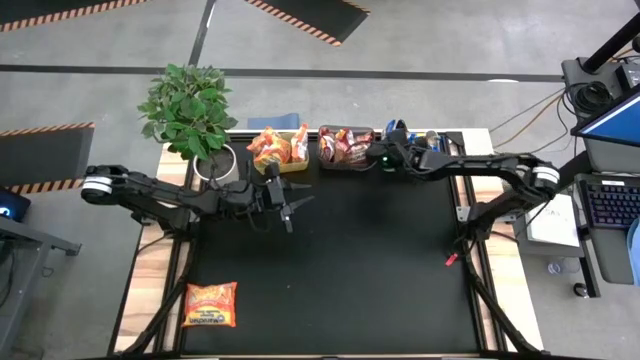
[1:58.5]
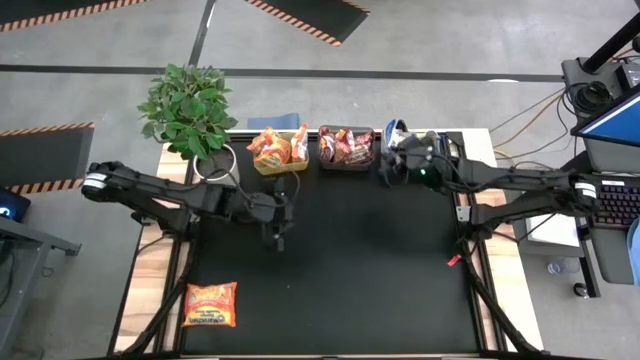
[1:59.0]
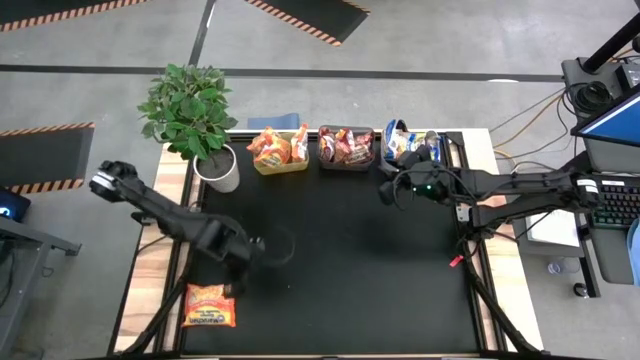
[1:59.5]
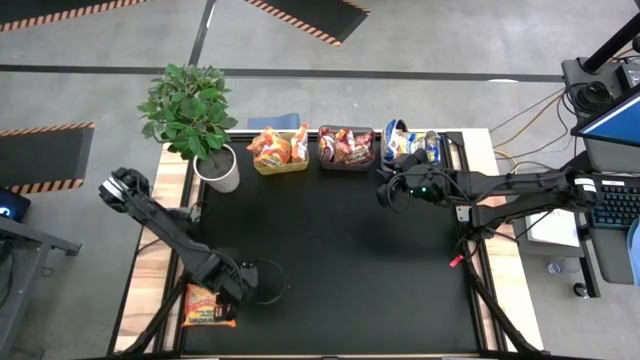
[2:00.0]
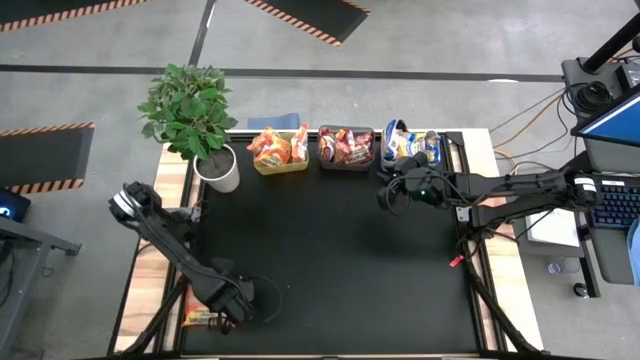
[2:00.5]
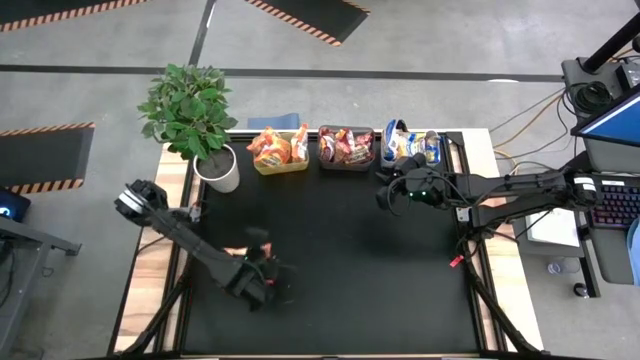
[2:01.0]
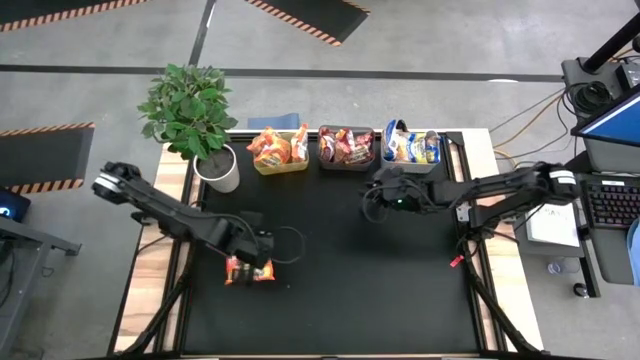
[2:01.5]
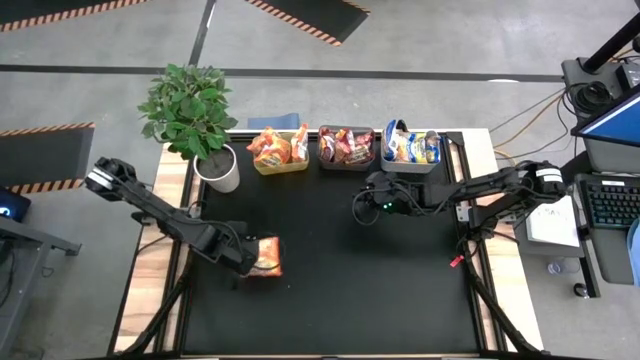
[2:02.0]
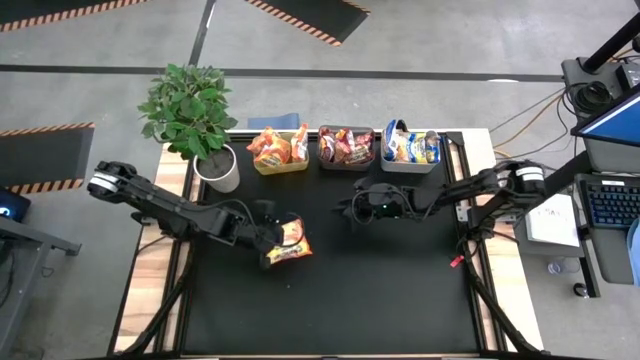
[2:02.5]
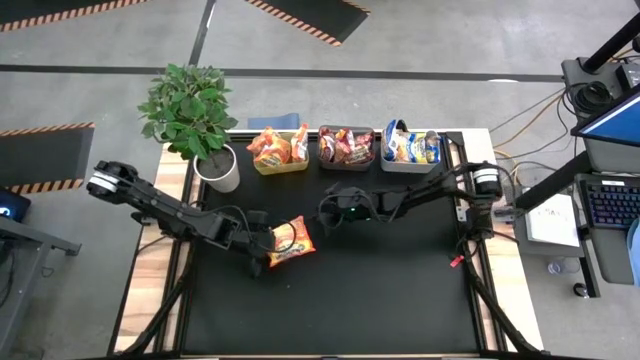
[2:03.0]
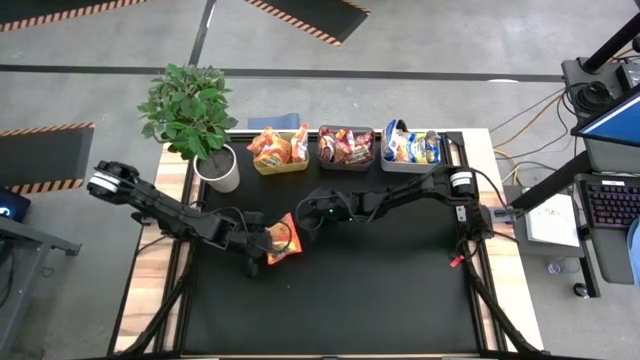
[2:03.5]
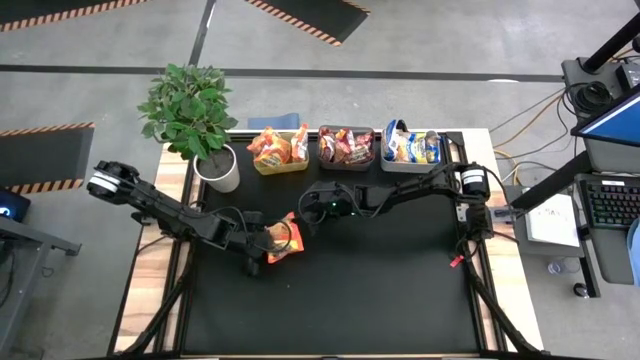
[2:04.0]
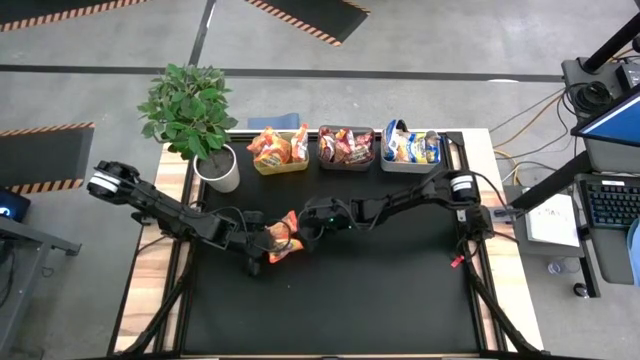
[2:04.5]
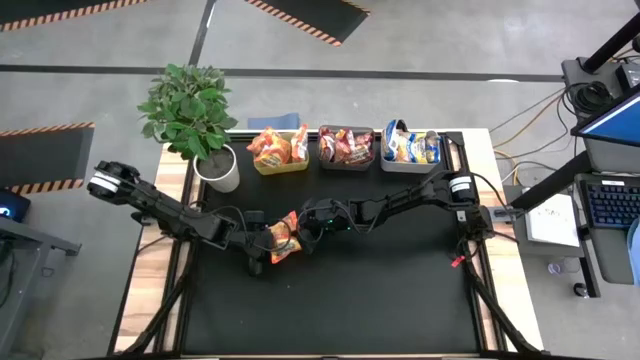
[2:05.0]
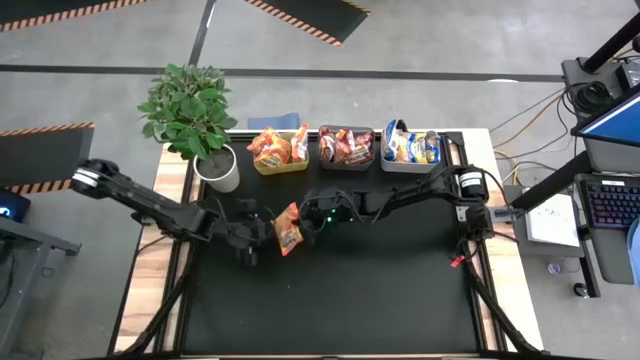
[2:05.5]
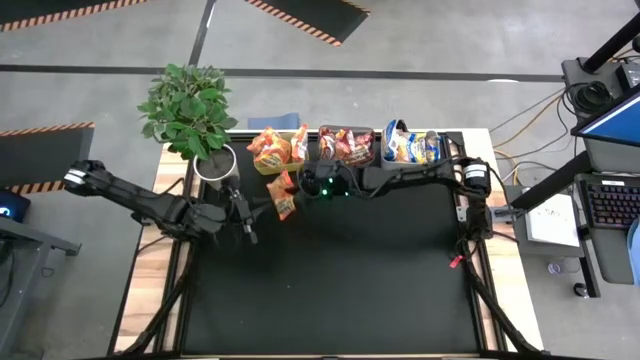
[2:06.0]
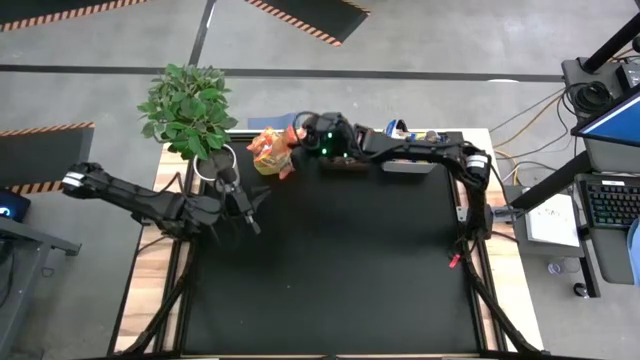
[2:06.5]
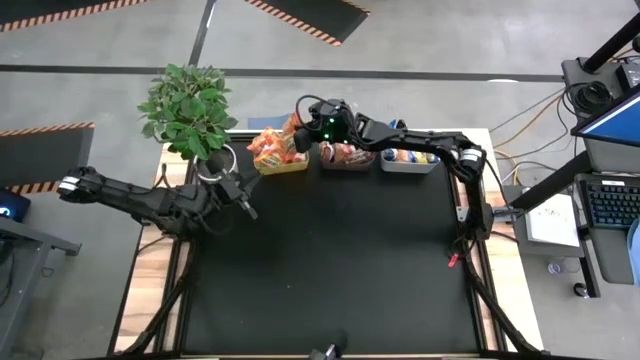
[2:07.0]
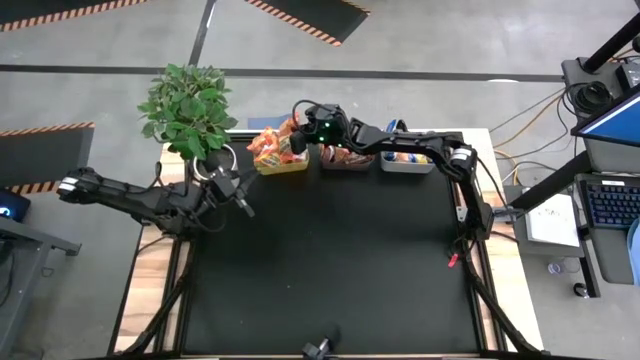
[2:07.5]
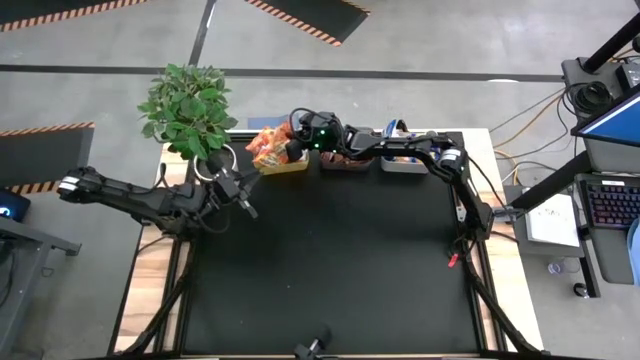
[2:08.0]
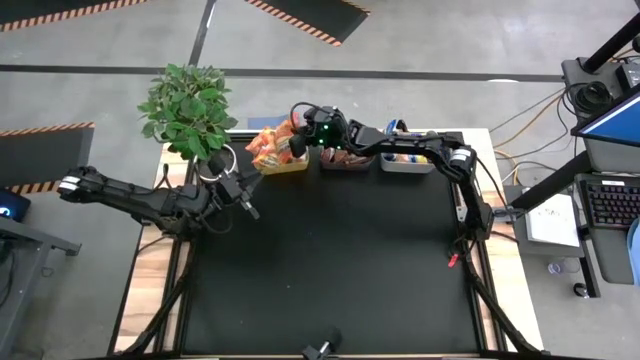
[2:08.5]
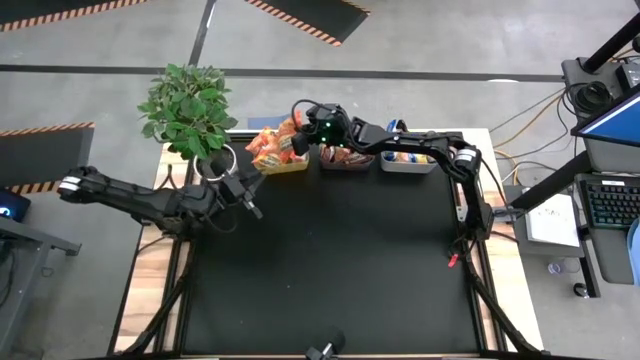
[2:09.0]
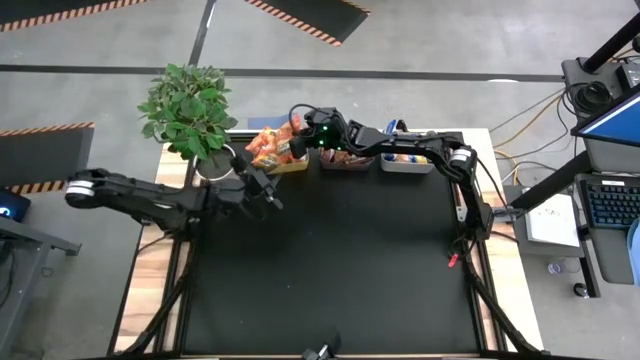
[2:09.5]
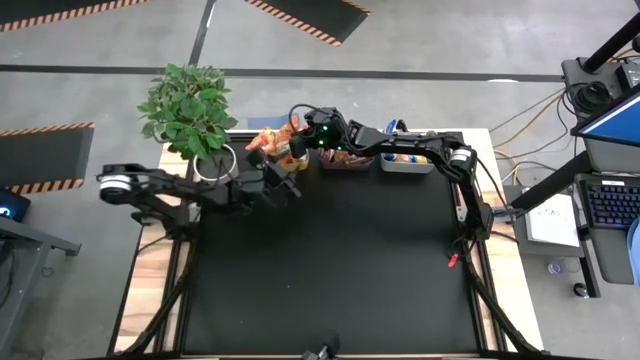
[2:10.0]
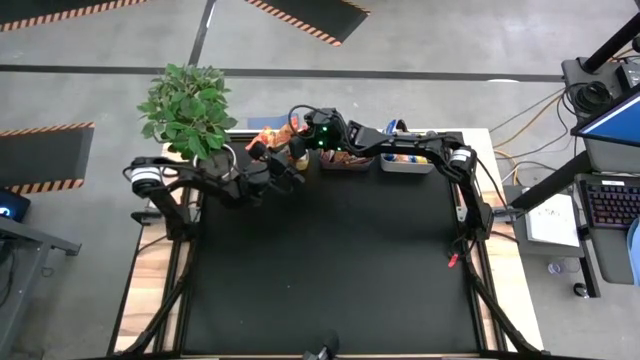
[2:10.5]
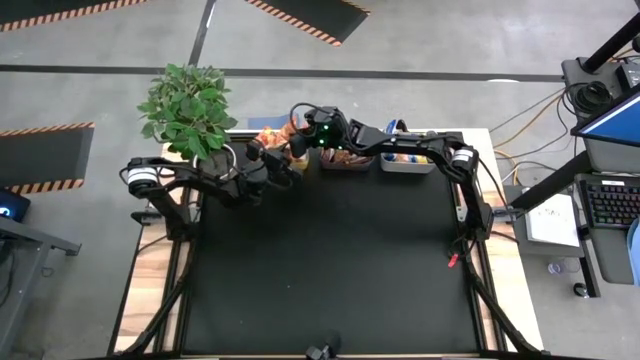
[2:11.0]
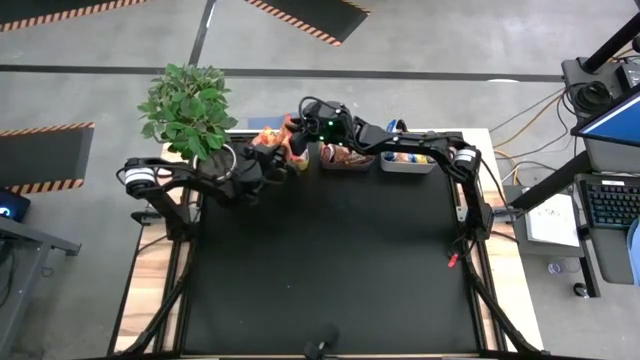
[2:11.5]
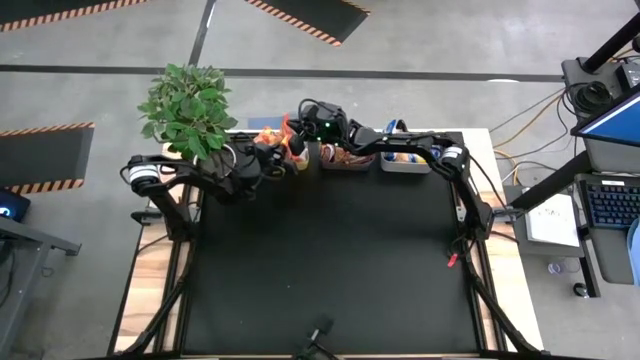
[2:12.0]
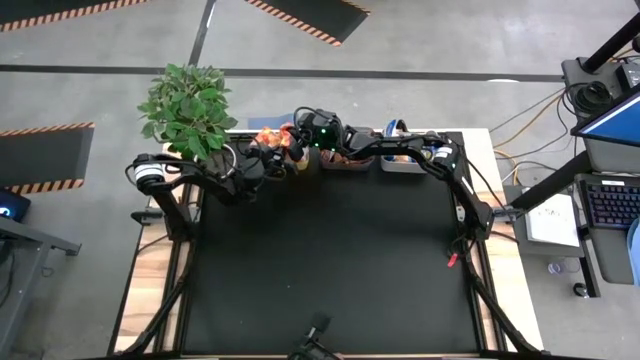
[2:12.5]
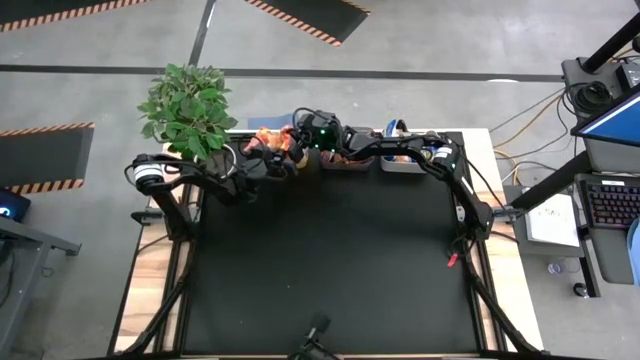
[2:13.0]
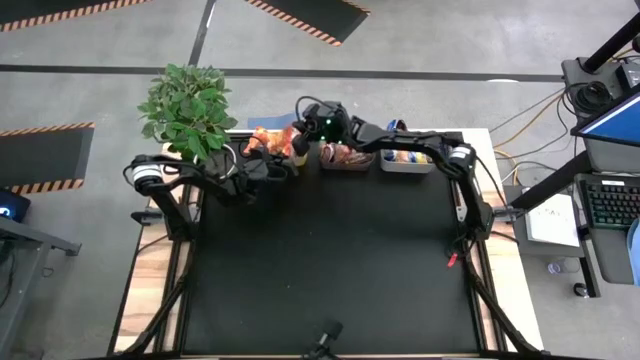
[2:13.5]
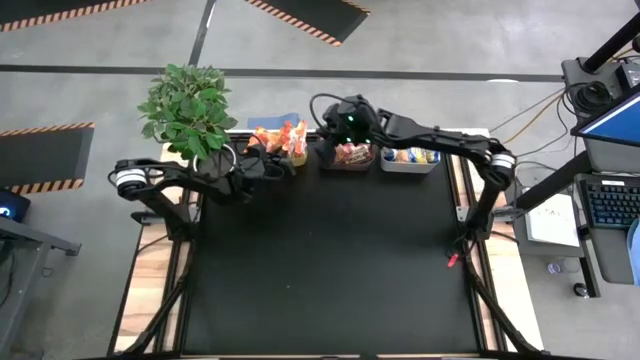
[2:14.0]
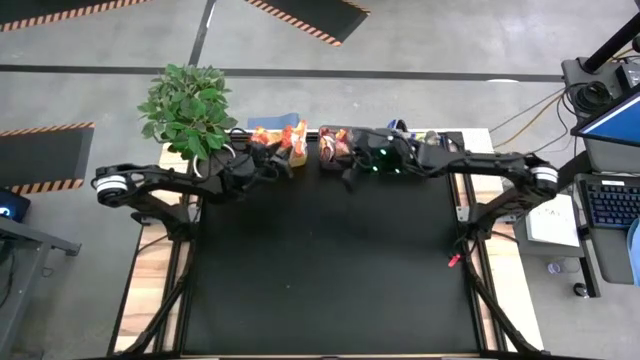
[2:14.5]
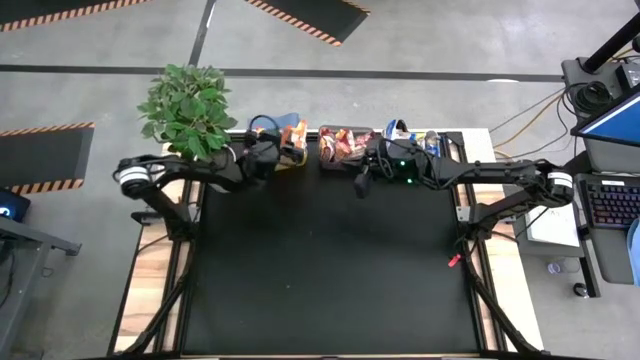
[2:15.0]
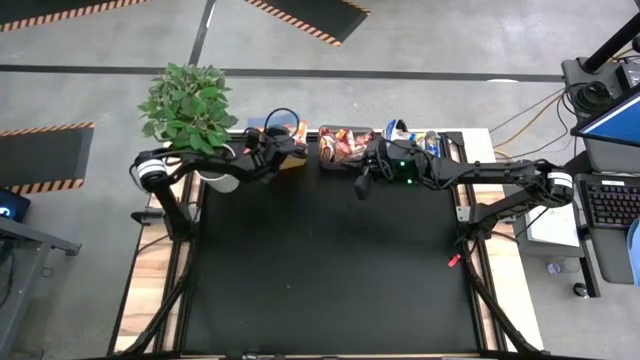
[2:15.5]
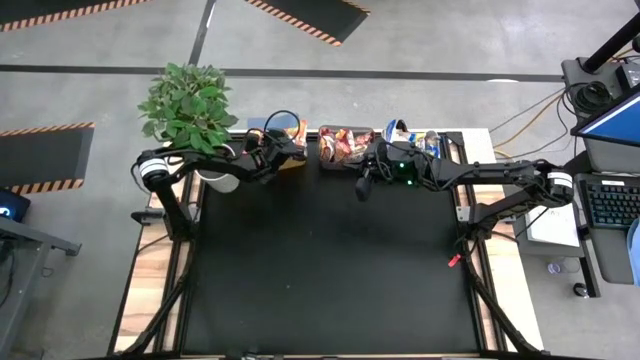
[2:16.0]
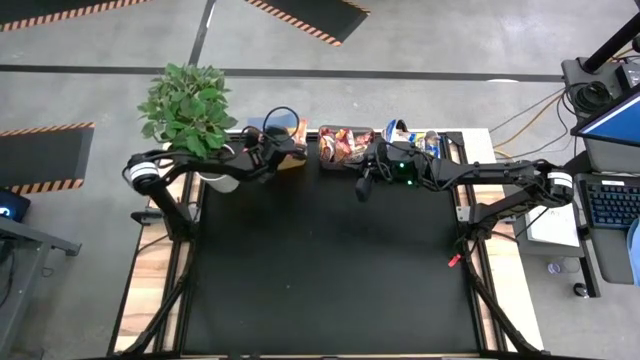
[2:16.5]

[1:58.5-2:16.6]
Task: Sort Maruchan noodles
Put the orange noodle pack into the yellow bin

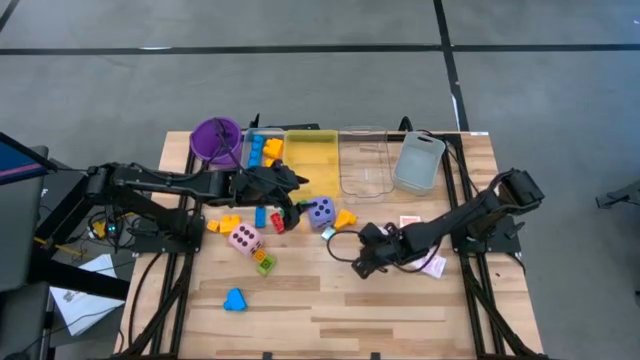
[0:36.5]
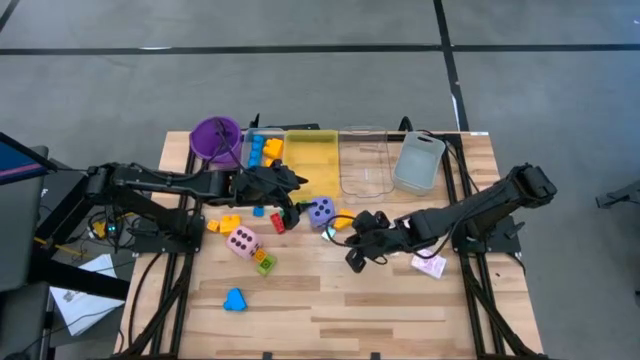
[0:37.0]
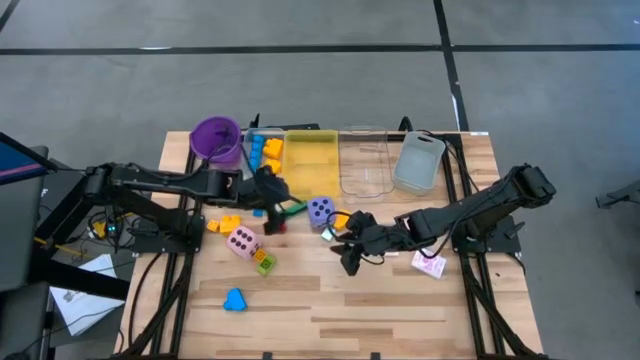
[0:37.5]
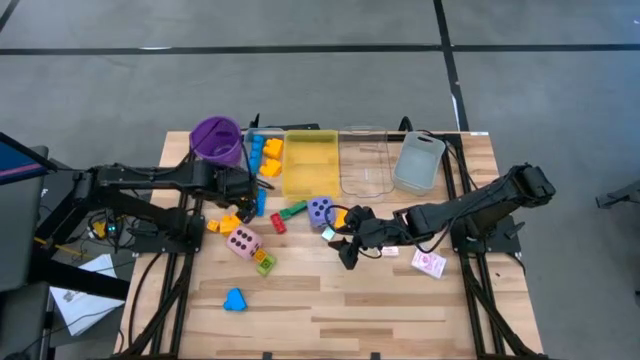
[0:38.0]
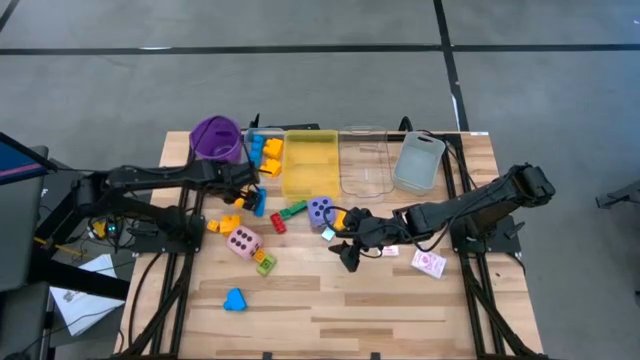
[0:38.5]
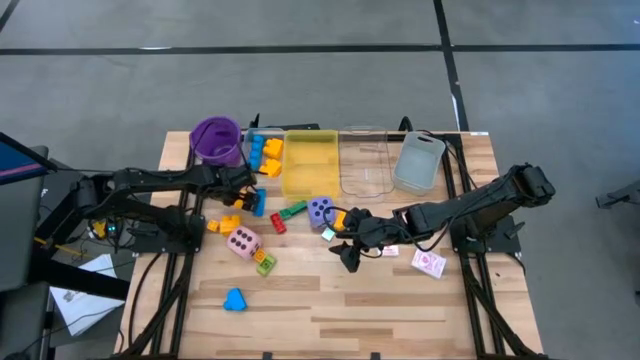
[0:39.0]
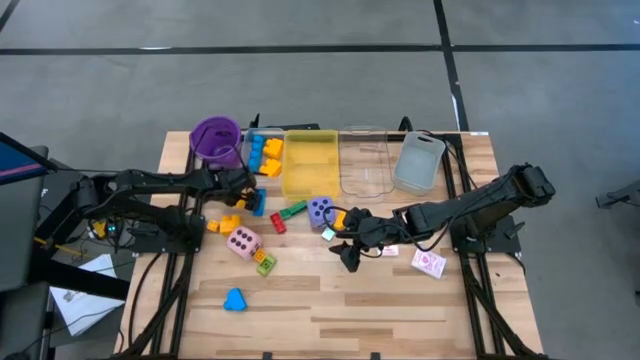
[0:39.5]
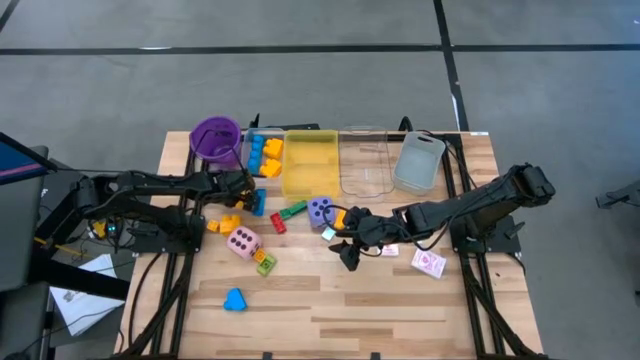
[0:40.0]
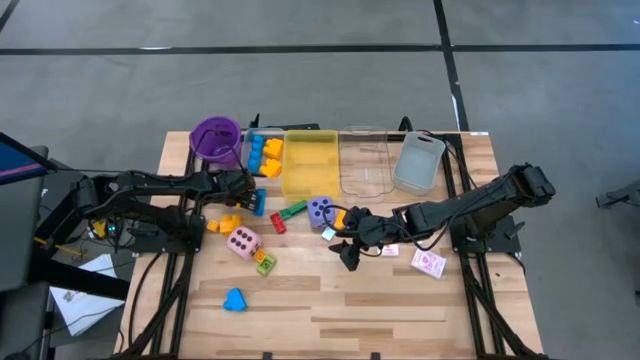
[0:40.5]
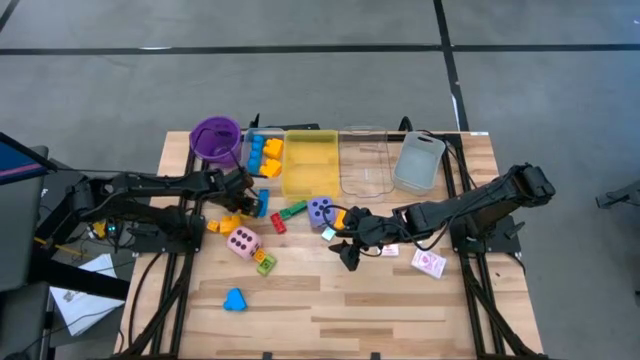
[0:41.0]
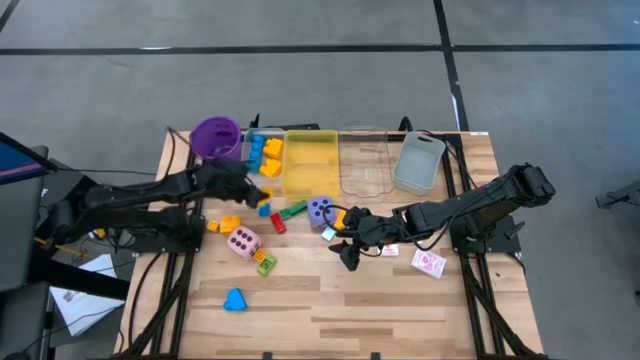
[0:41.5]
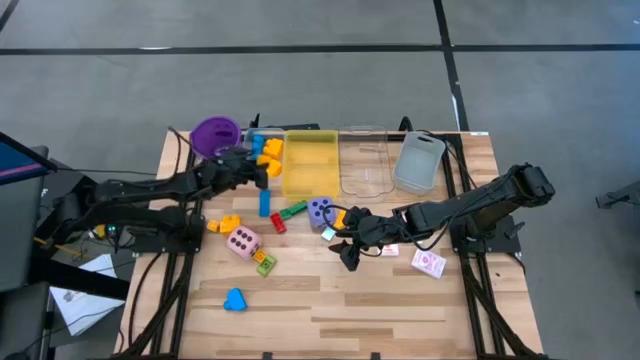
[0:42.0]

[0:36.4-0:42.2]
Task: Pick & Place Toys
Put the right yellow stud game piece into the left transparent bin
